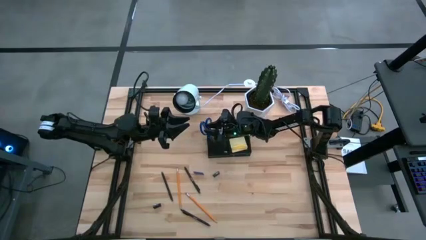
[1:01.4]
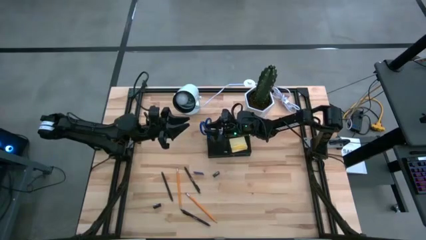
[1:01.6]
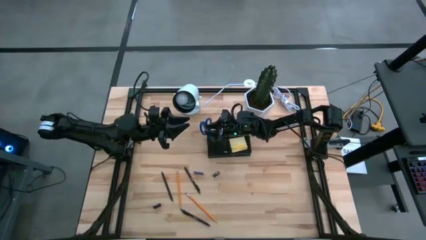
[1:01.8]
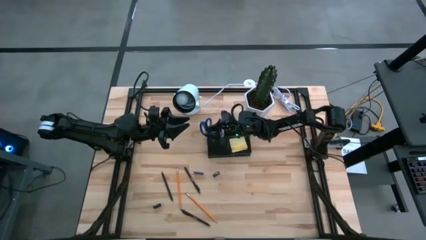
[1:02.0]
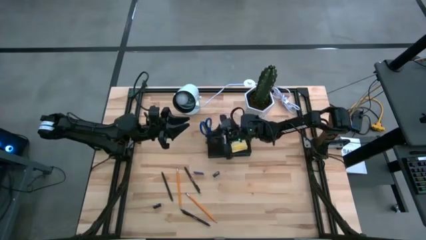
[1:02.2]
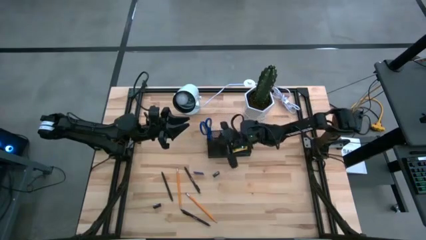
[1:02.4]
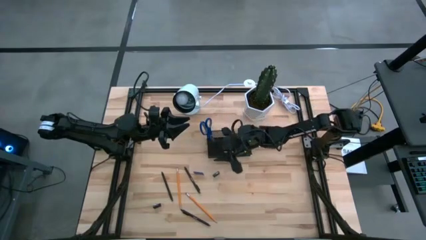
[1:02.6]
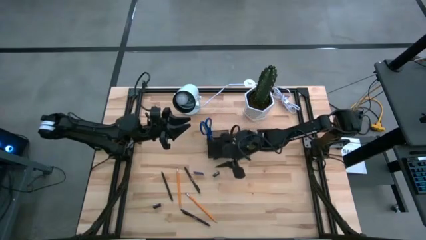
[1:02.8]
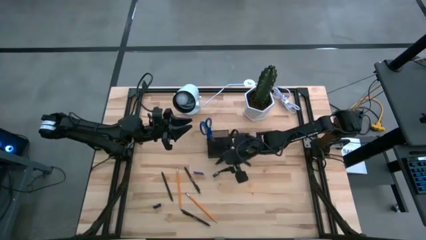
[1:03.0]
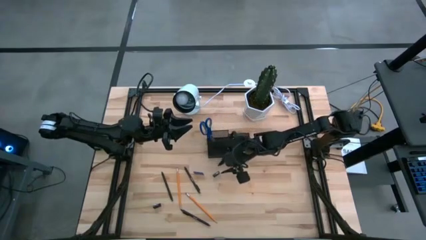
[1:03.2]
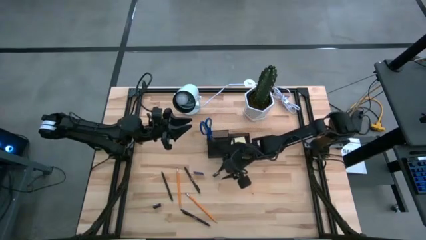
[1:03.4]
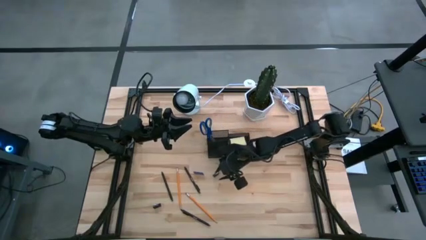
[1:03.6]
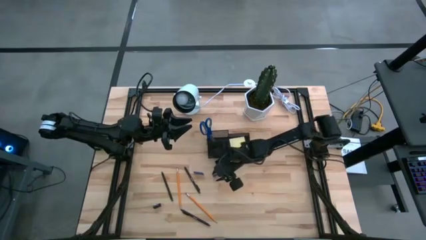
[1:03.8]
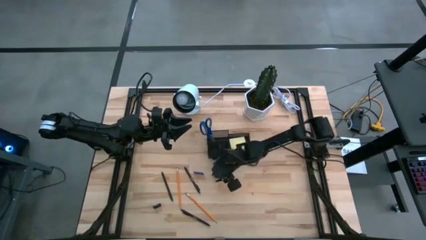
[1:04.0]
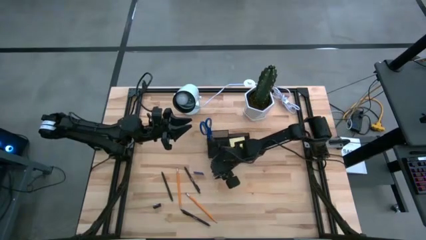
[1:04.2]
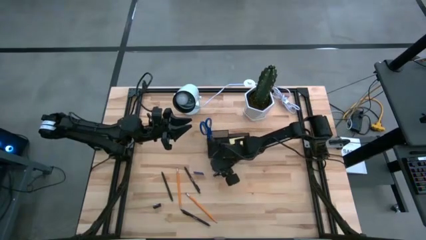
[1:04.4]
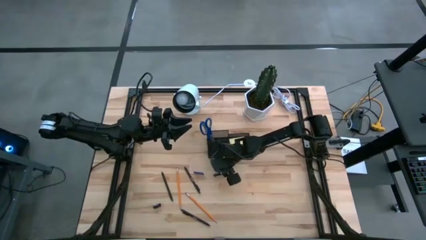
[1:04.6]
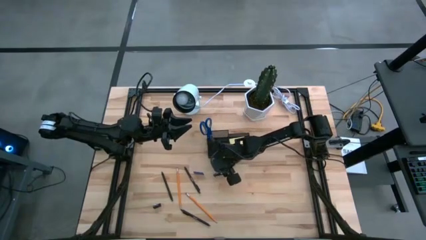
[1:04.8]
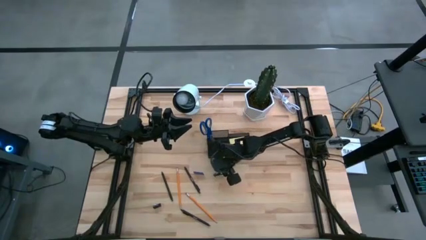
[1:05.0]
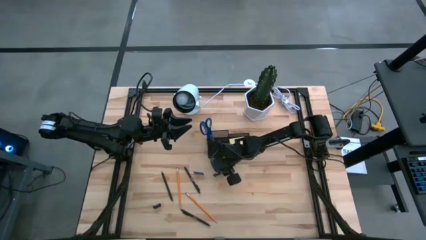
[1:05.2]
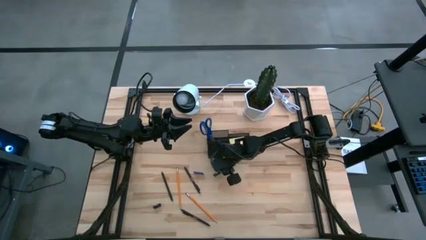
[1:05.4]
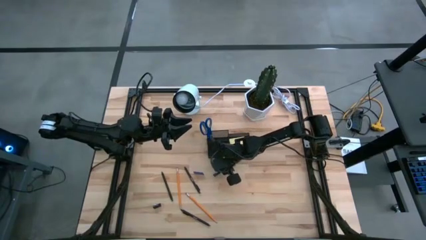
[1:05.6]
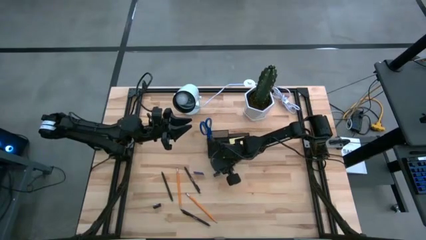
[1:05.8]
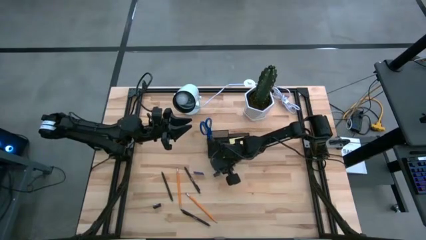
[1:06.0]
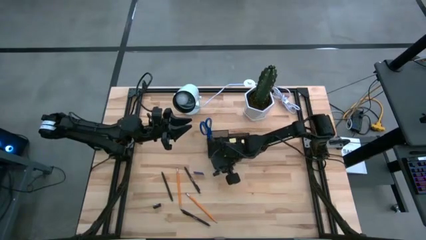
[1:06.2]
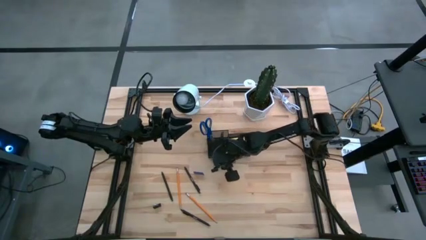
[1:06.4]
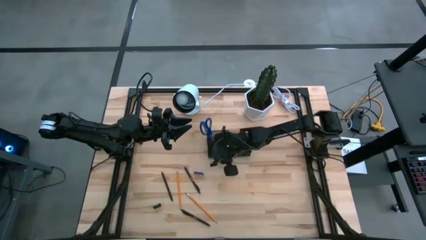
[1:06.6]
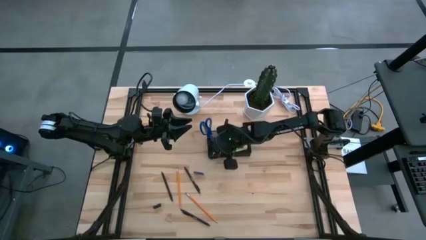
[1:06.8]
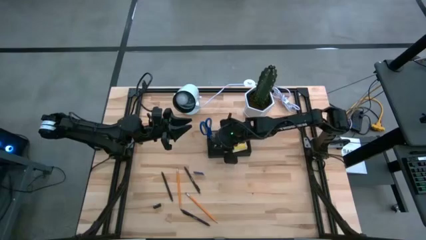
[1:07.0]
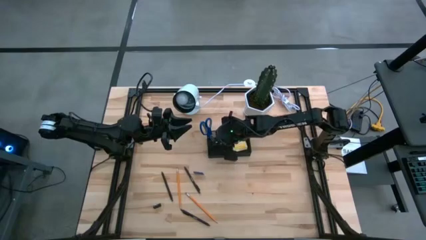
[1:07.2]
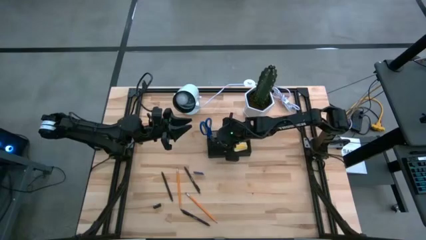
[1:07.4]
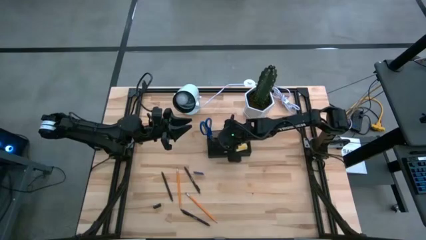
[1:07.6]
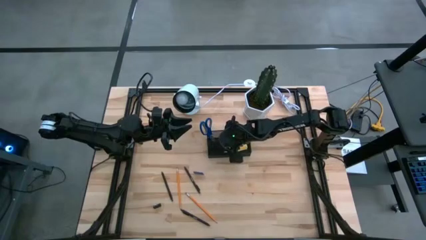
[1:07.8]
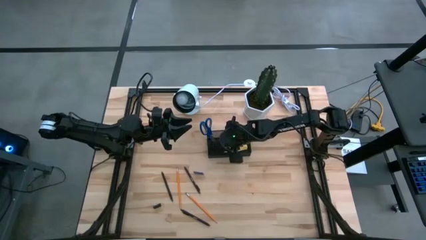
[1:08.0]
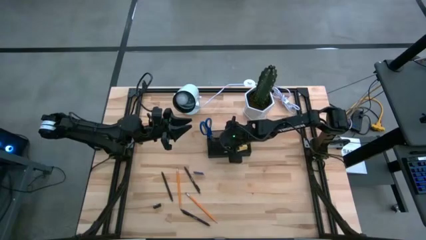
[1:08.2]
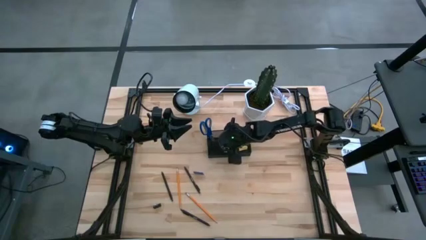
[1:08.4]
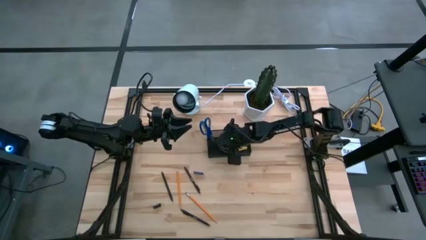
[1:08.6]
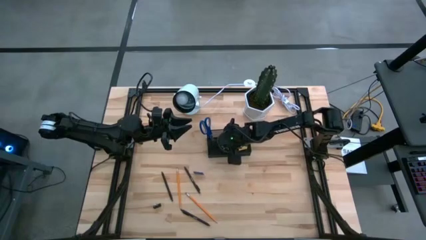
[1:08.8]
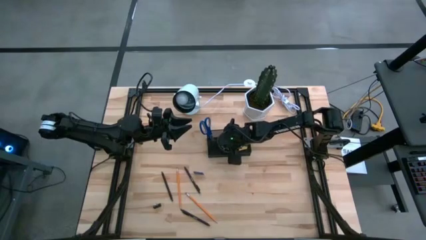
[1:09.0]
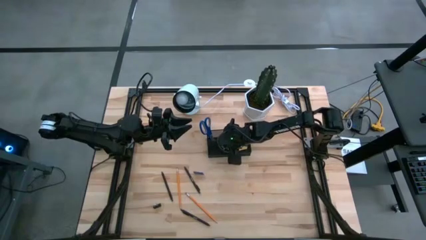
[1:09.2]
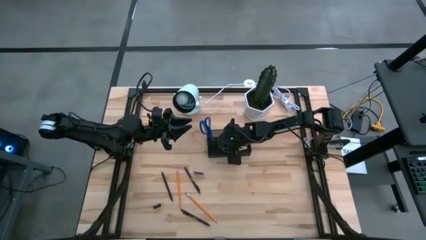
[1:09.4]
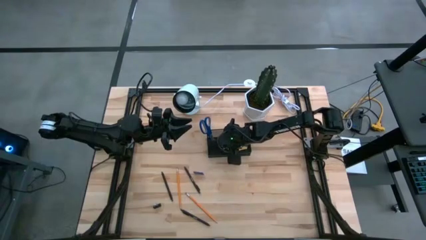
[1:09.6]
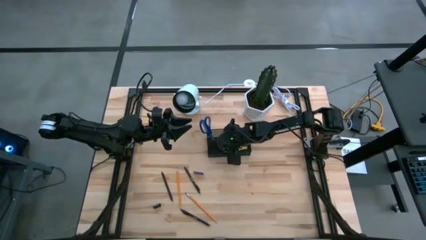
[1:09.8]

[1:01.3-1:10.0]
Task: Pick and place office supplies into organizer
Put the top black binder clip into the black desk organizer
